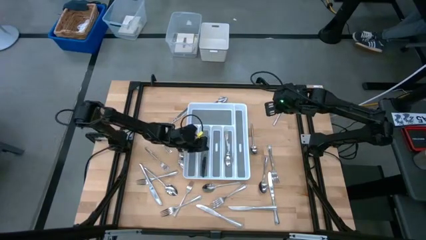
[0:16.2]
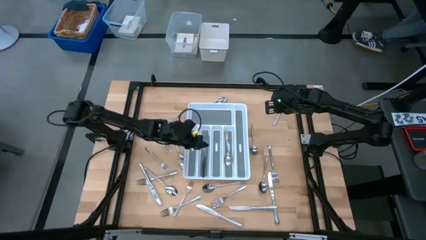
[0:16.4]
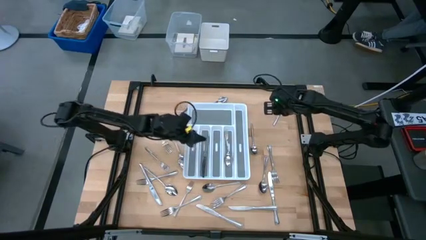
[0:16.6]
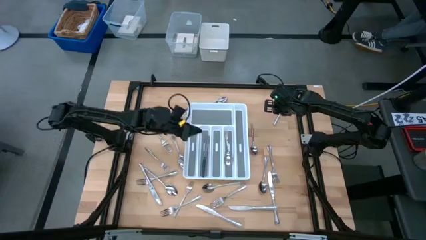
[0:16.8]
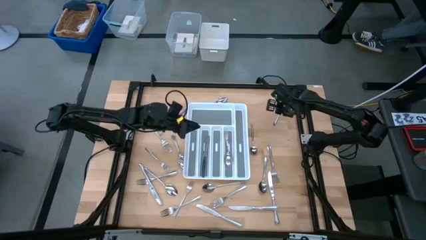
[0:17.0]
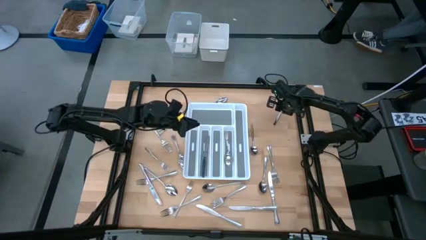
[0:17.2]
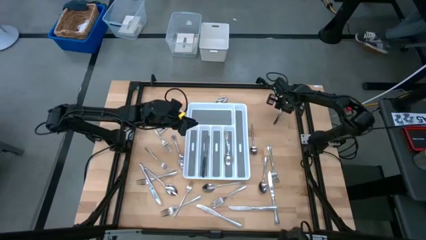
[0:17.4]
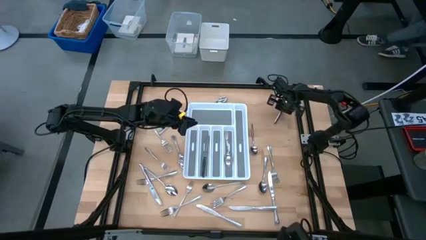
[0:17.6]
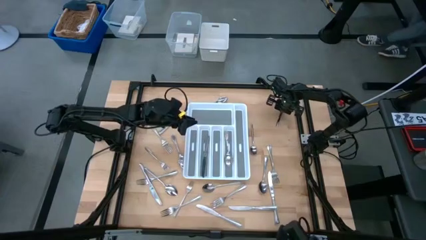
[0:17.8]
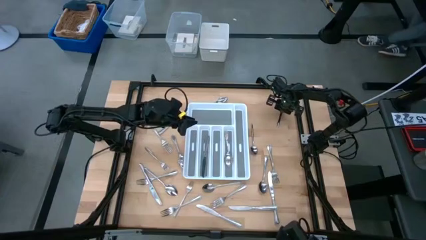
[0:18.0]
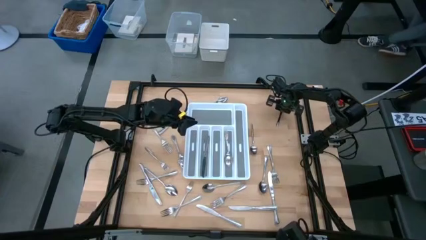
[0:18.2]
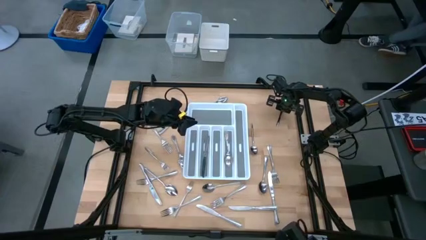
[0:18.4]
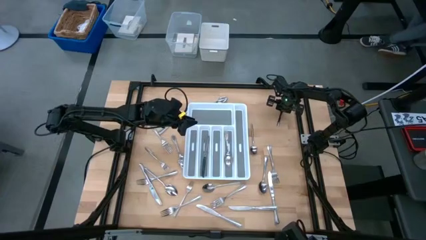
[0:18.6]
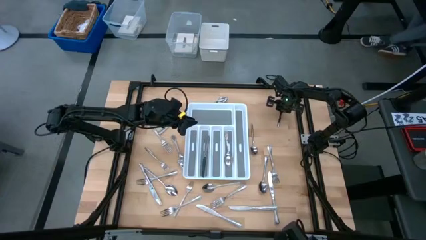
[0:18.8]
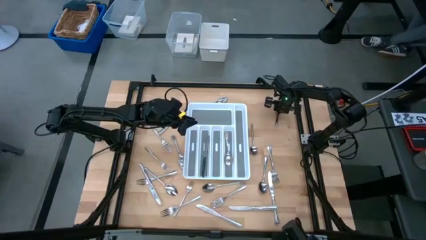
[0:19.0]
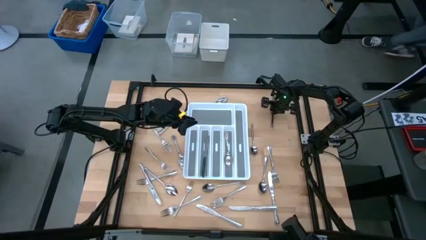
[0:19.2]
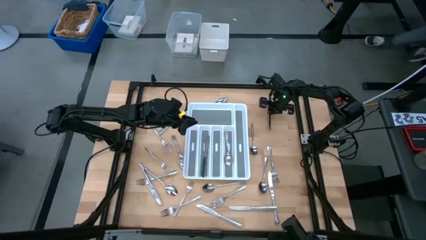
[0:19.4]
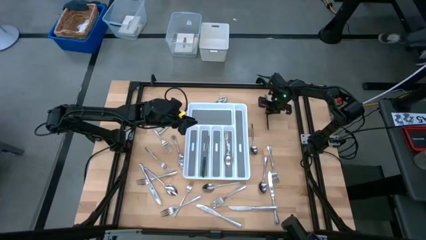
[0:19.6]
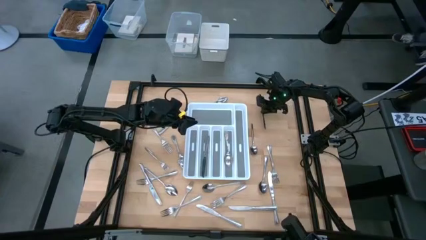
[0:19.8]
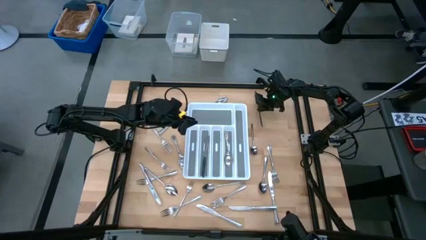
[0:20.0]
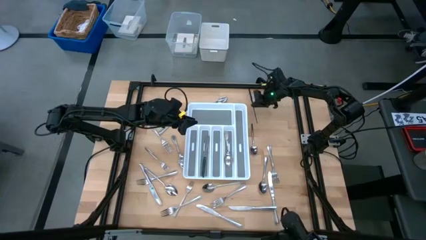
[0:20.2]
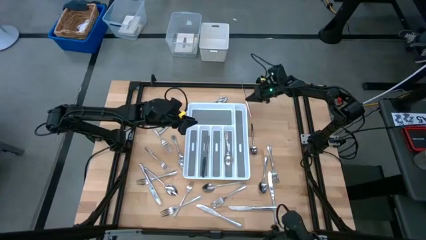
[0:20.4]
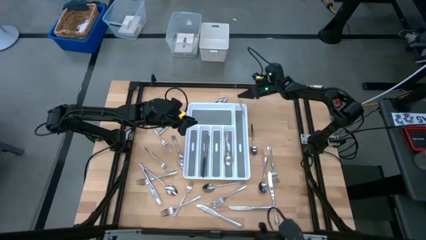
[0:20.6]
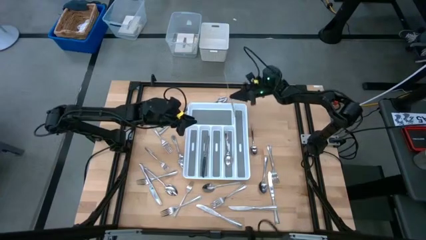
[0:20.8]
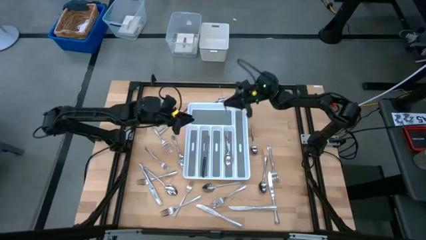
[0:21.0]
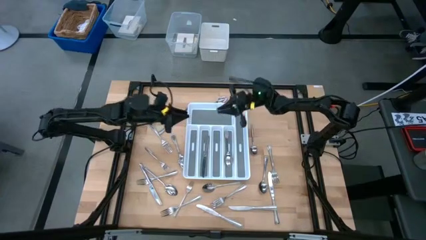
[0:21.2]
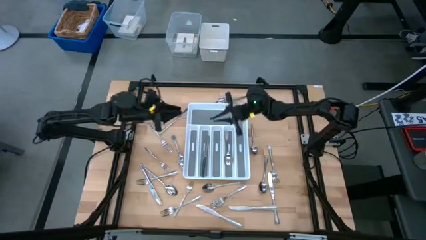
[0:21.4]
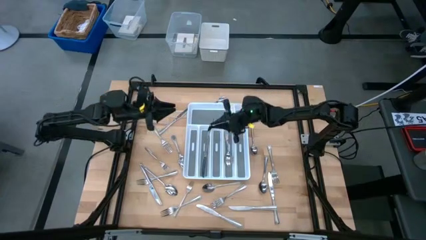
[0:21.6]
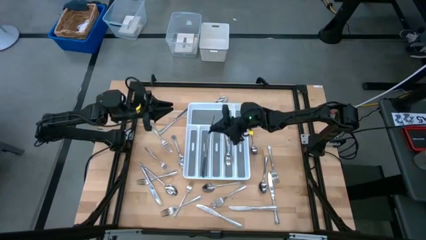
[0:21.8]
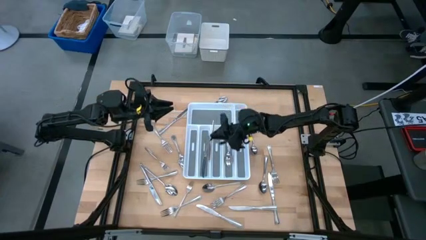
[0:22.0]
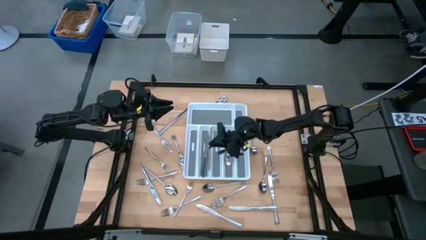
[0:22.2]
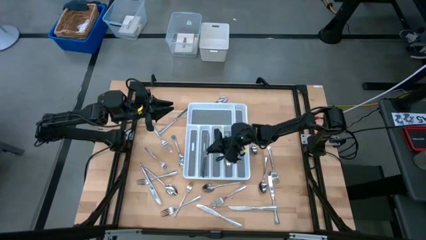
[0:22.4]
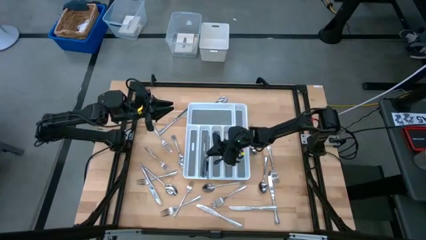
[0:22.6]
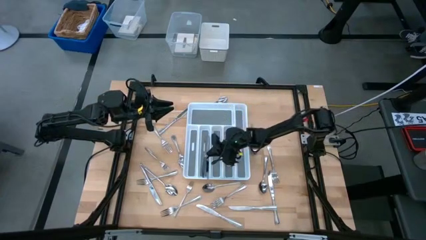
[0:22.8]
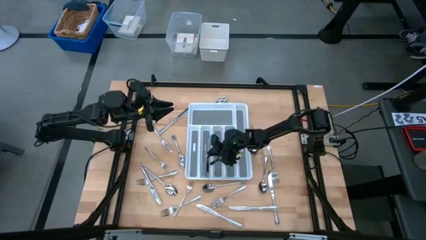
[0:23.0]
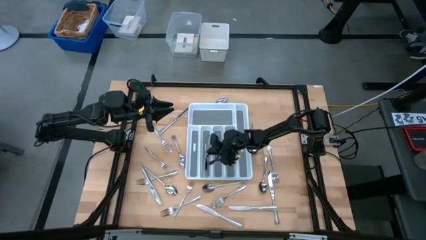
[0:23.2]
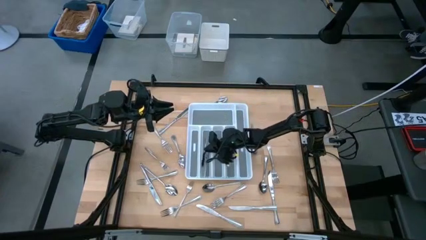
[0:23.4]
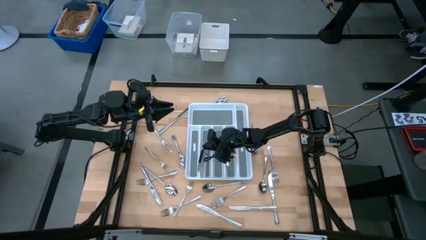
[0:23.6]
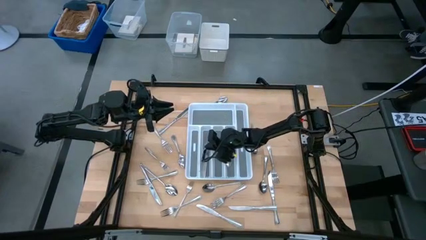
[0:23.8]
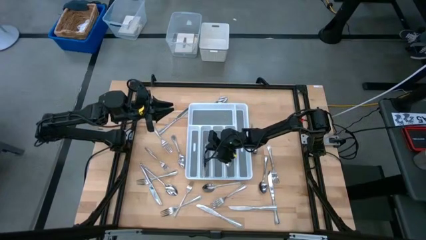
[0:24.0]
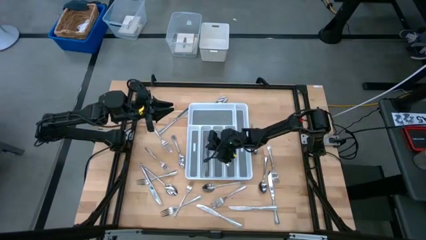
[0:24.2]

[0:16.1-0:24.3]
Task: Sort silverware
Put the silver table knife into the white cutlery tray

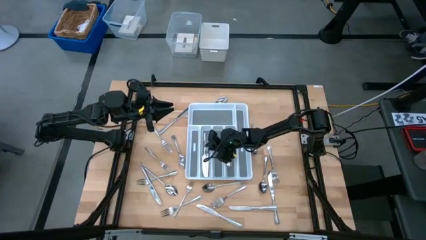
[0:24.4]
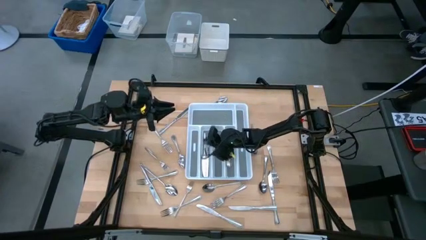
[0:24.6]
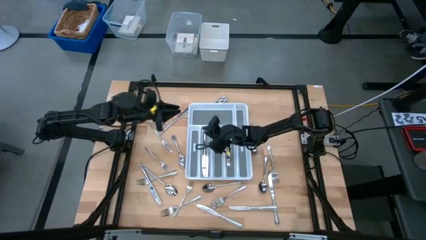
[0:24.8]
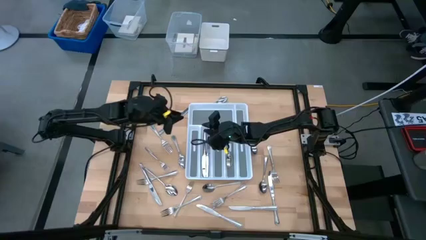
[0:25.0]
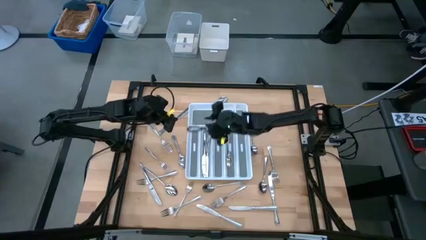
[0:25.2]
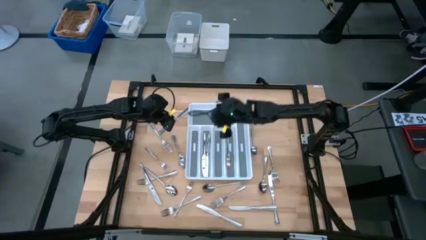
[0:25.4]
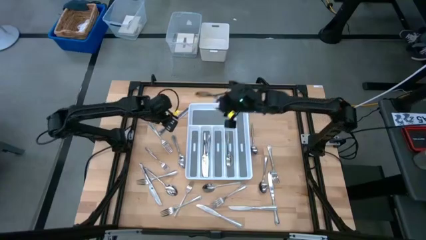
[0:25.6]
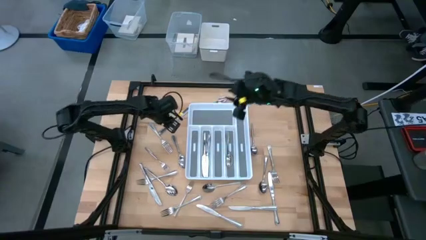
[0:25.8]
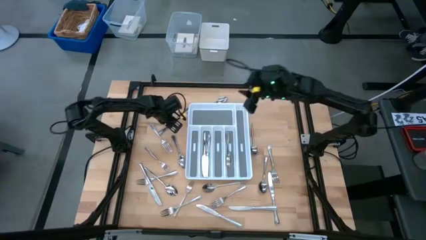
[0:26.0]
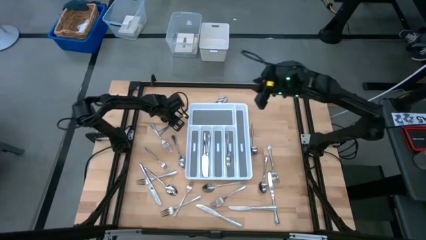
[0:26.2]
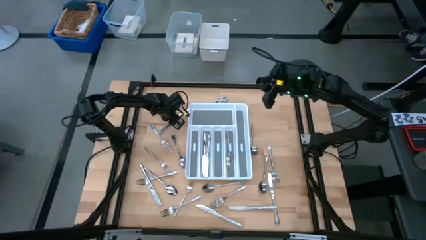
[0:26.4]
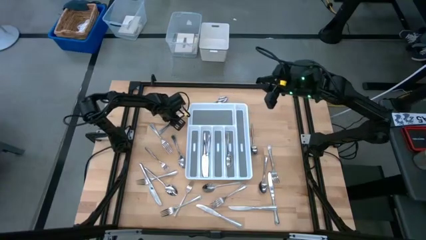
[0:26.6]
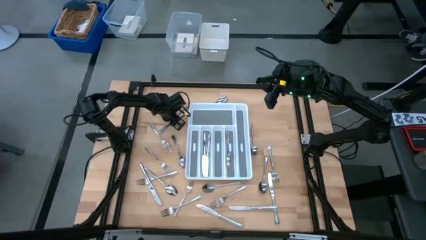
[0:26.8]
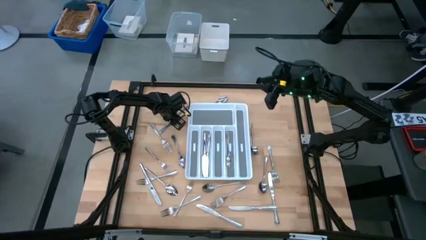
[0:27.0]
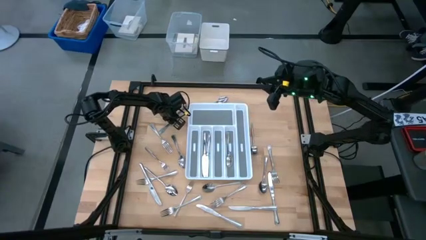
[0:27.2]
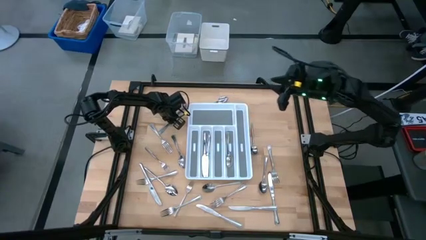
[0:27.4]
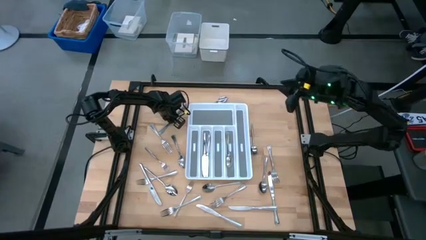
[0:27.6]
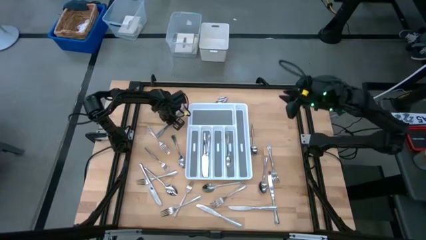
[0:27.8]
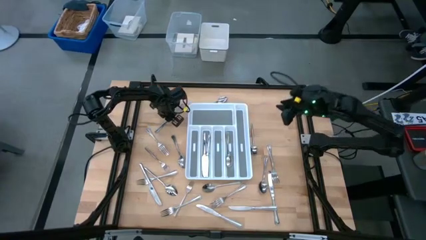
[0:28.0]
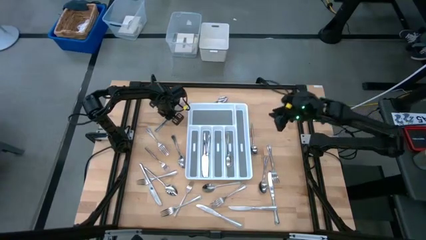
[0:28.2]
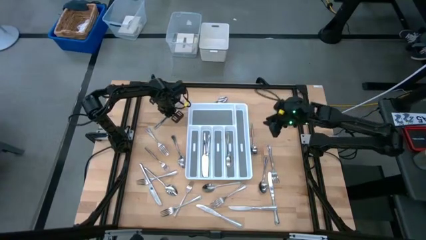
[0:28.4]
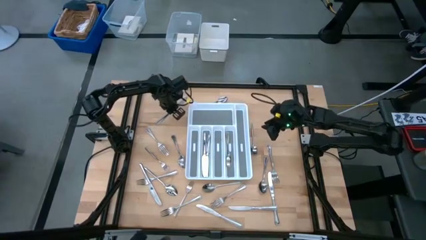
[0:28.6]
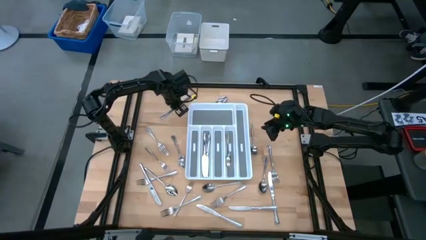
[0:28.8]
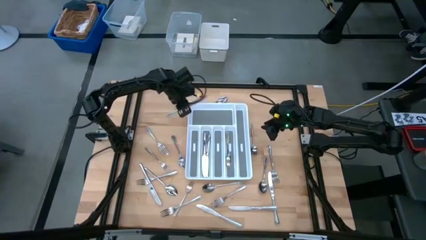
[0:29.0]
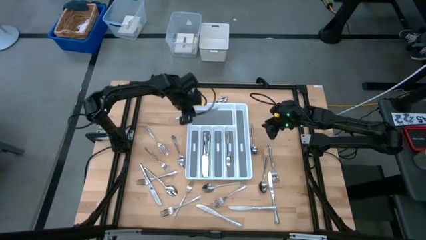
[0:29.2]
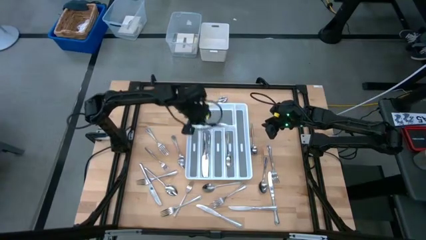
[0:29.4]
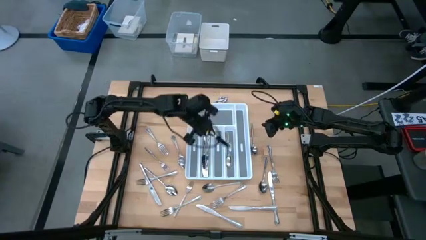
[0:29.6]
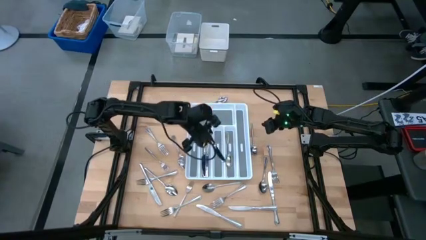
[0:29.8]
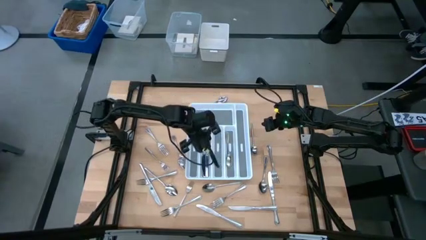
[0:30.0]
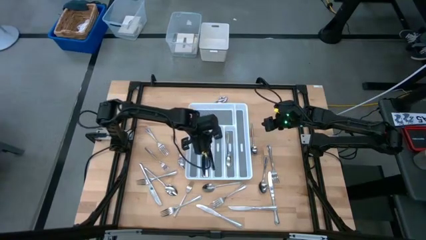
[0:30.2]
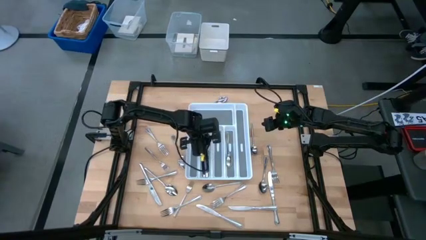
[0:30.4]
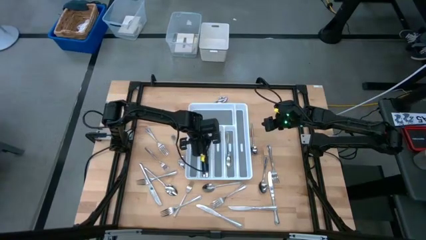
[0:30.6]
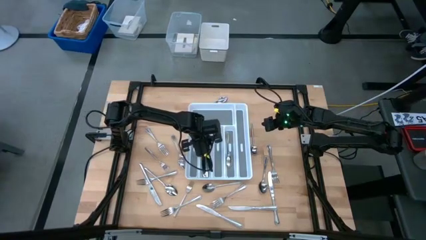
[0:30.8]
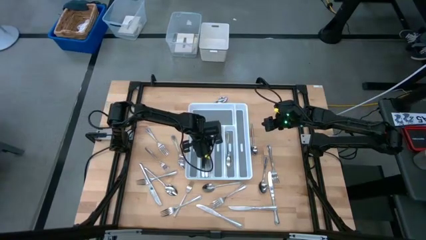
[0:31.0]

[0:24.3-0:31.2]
Put the silver table knife into the white cutlery tray

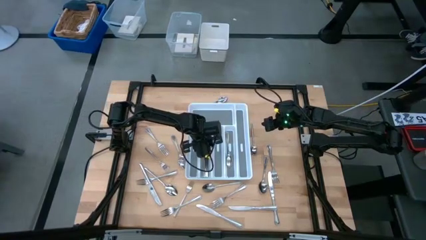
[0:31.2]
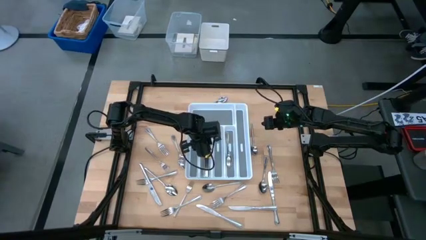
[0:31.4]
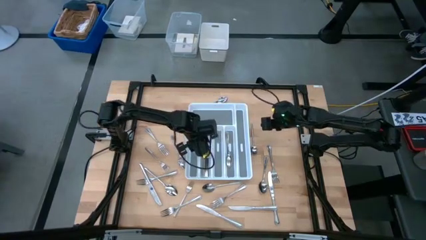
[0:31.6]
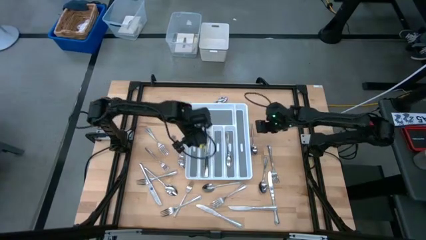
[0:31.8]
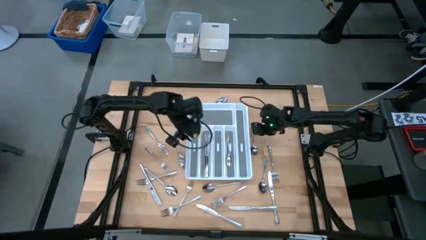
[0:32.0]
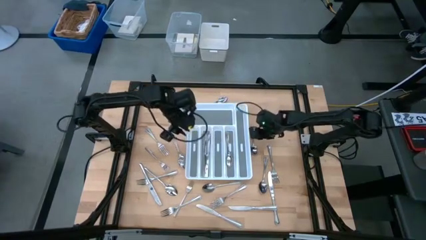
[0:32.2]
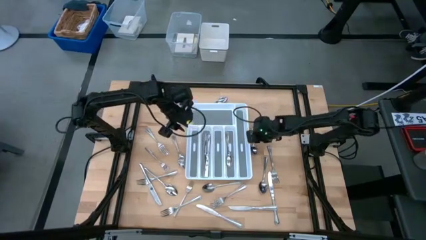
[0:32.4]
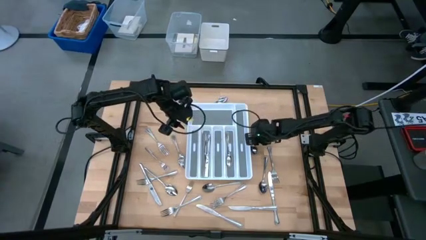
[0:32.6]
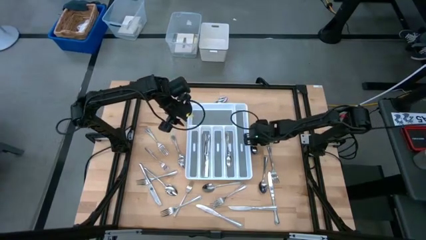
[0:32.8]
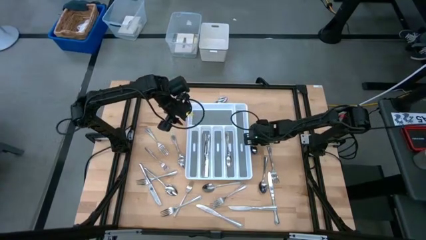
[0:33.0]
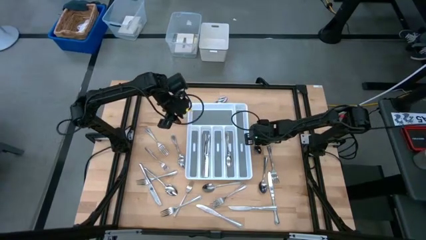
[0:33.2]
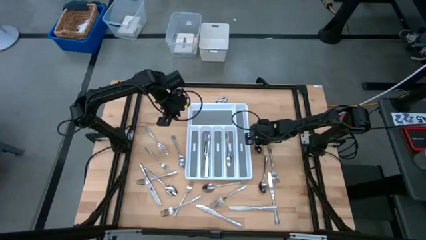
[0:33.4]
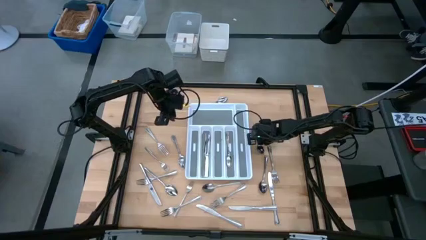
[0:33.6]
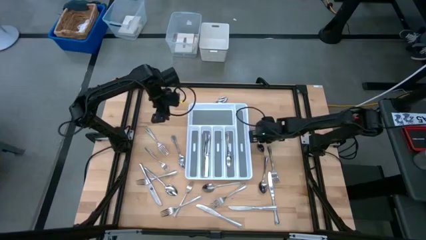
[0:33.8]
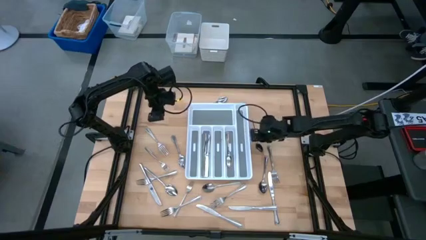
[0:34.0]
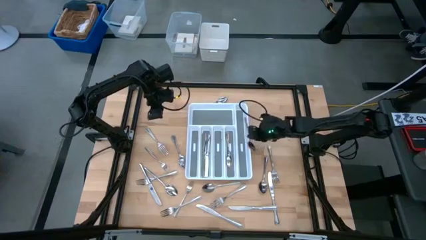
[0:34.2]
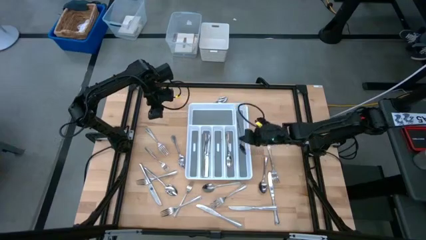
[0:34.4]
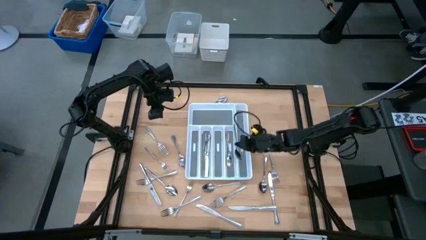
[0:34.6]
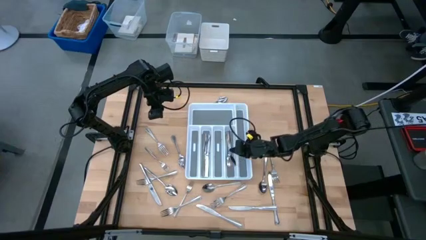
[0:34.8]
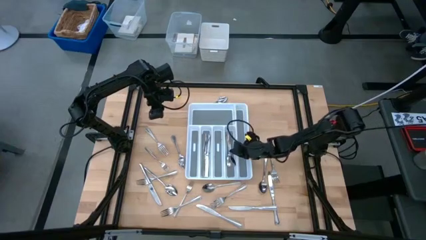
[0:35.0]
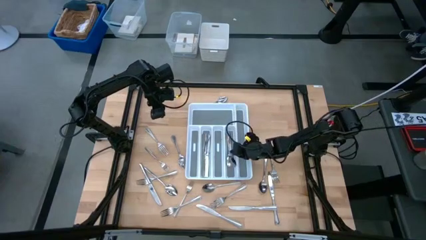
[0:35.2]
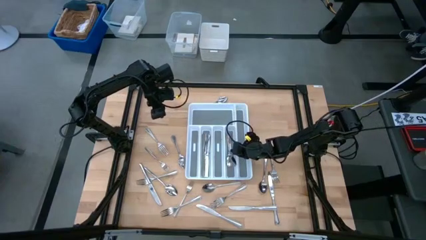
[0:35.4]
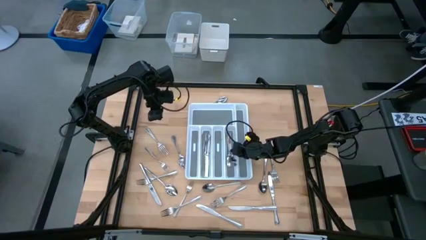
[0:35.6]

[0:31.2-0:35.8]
Put the silver spoon into the white cutlery tray
